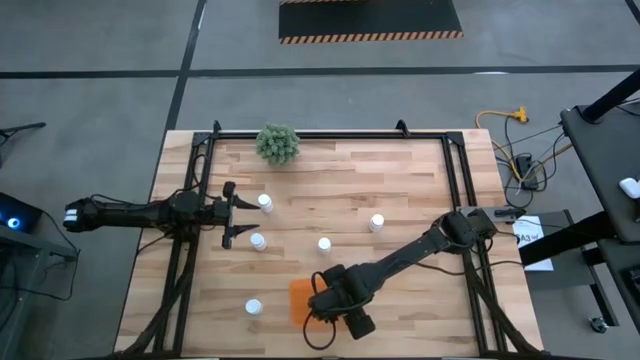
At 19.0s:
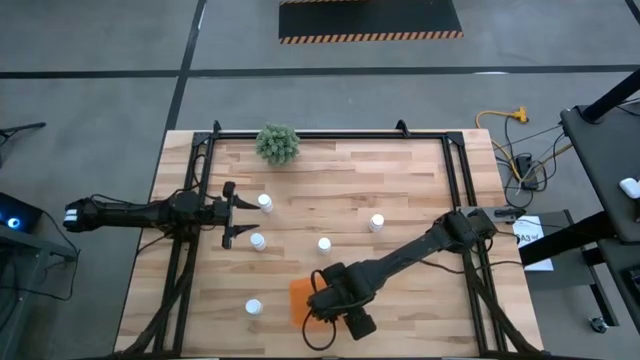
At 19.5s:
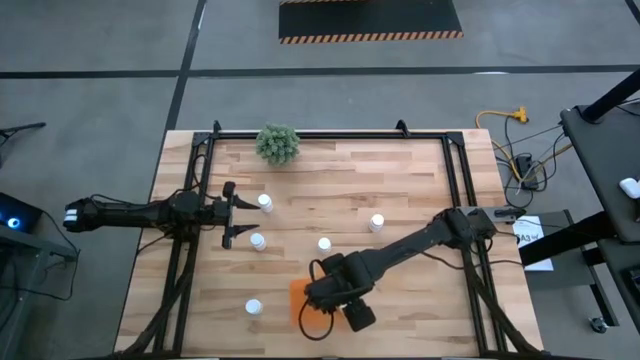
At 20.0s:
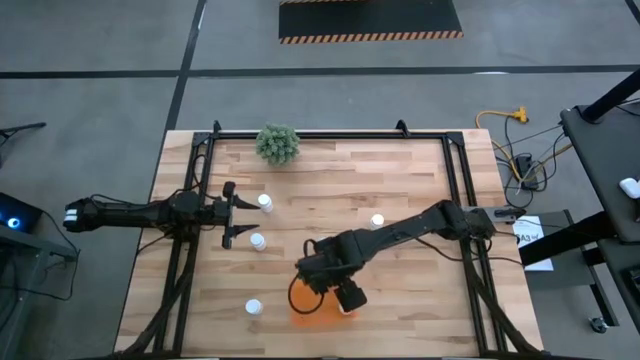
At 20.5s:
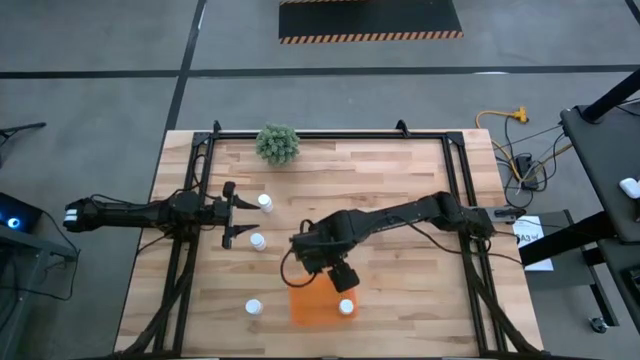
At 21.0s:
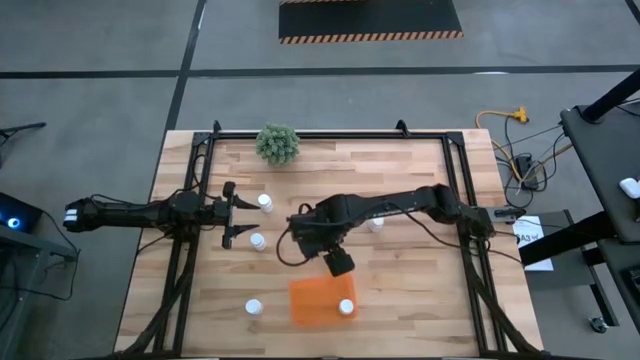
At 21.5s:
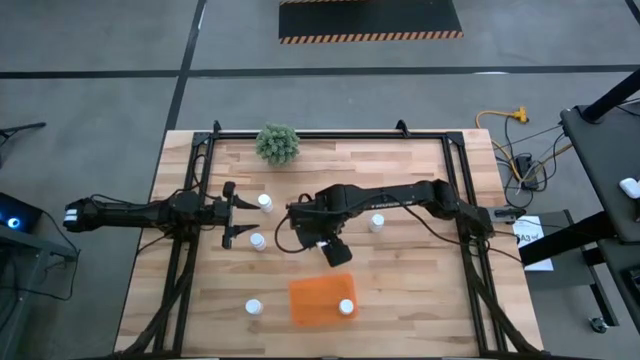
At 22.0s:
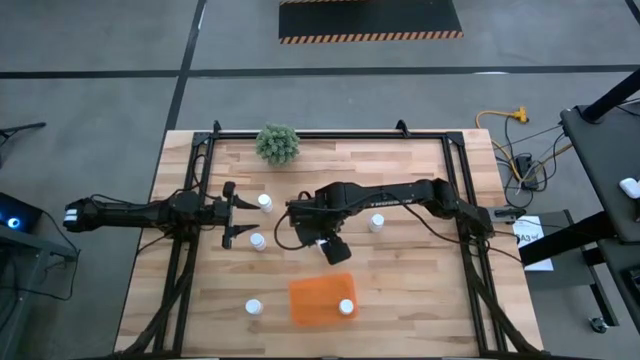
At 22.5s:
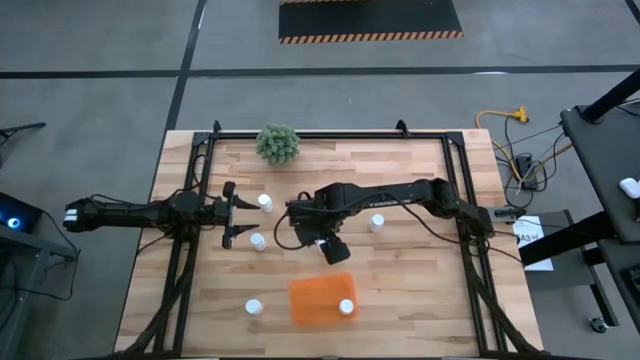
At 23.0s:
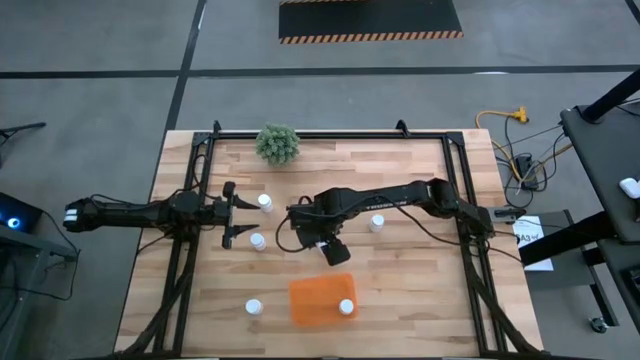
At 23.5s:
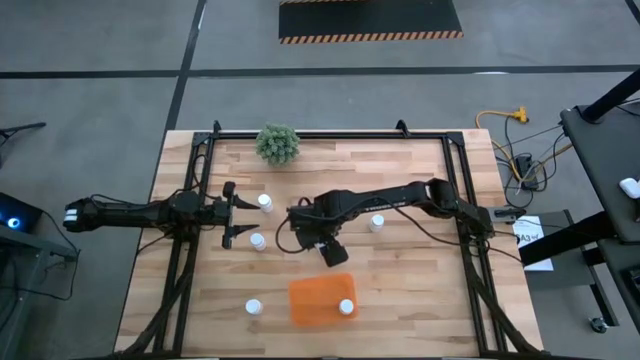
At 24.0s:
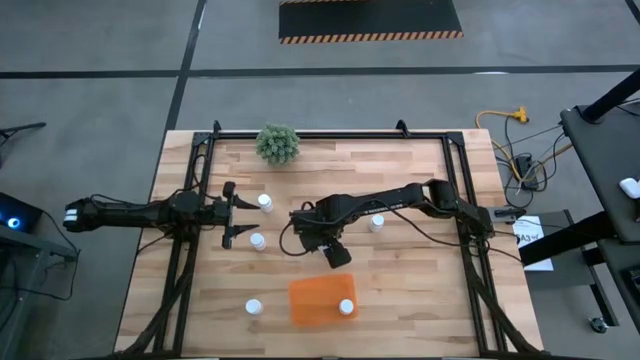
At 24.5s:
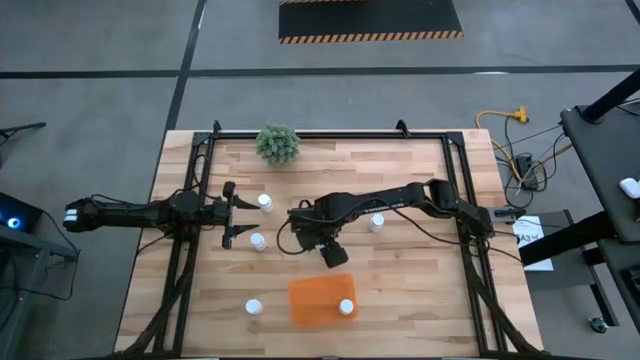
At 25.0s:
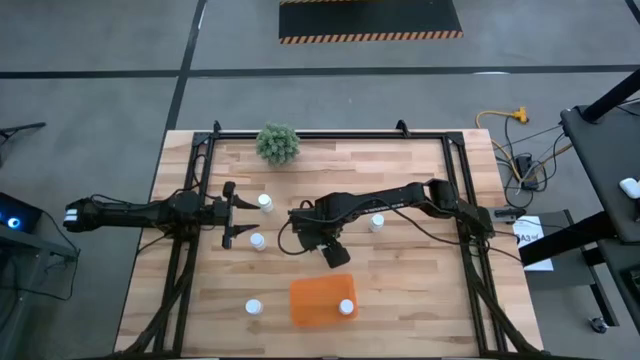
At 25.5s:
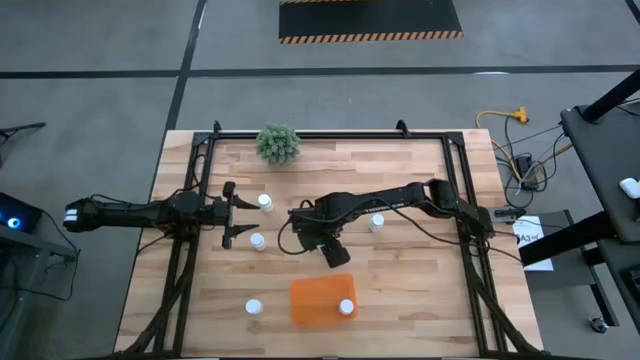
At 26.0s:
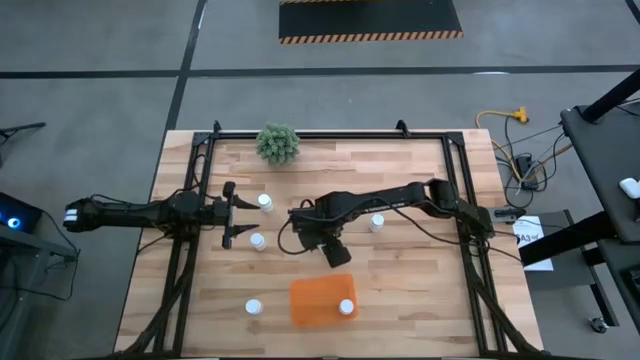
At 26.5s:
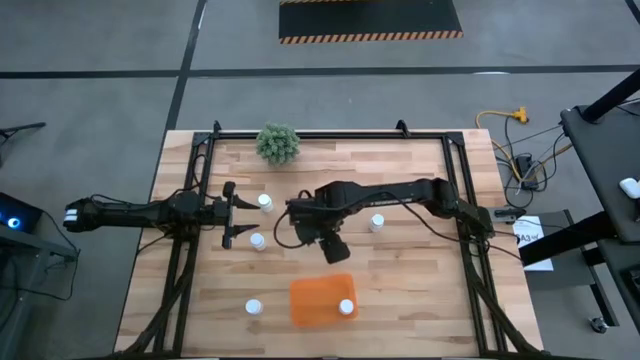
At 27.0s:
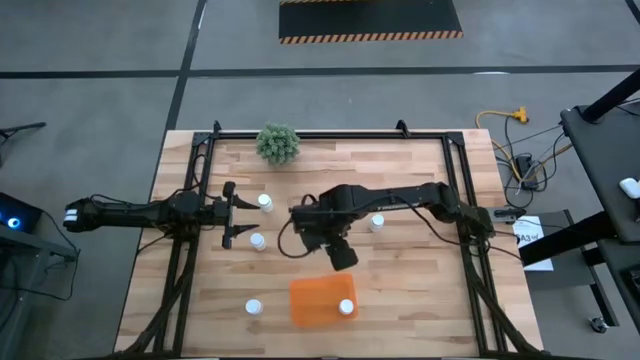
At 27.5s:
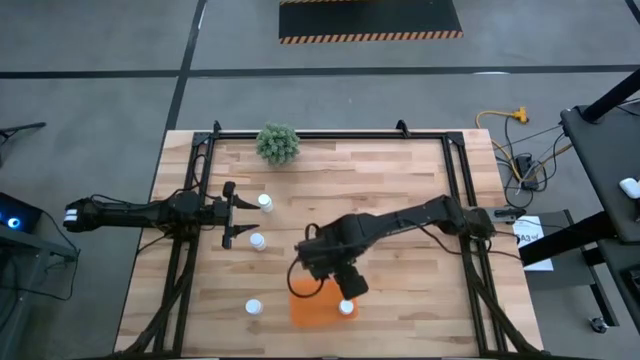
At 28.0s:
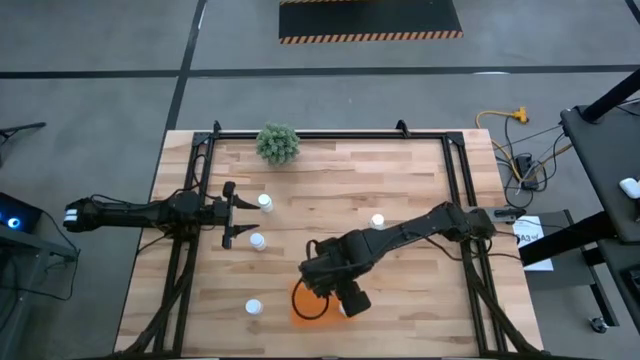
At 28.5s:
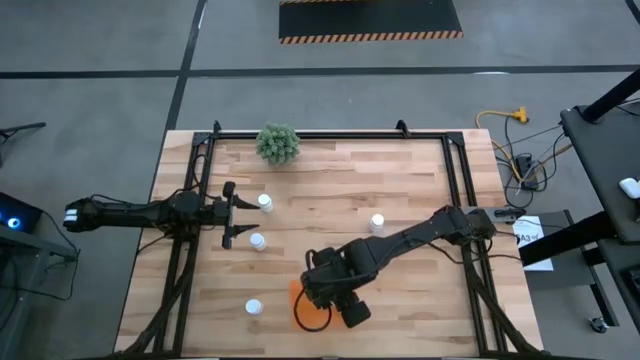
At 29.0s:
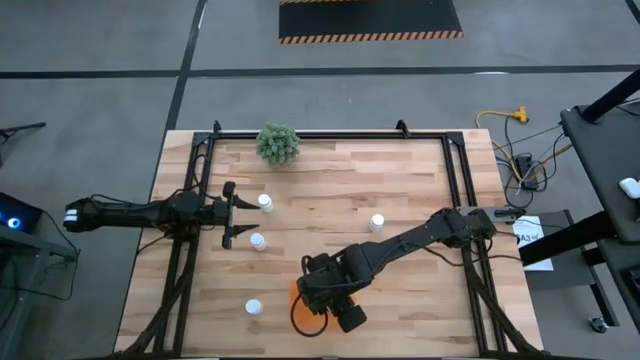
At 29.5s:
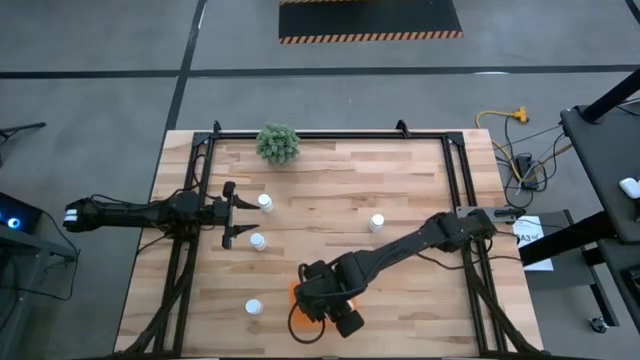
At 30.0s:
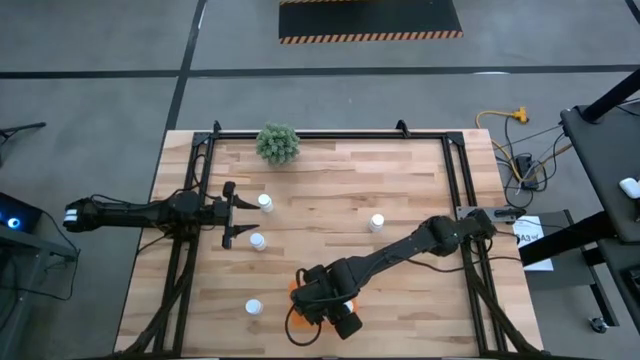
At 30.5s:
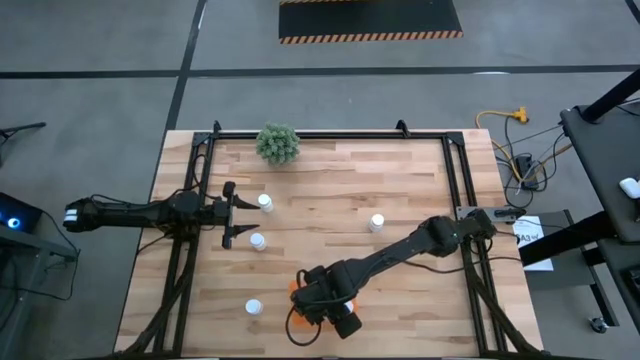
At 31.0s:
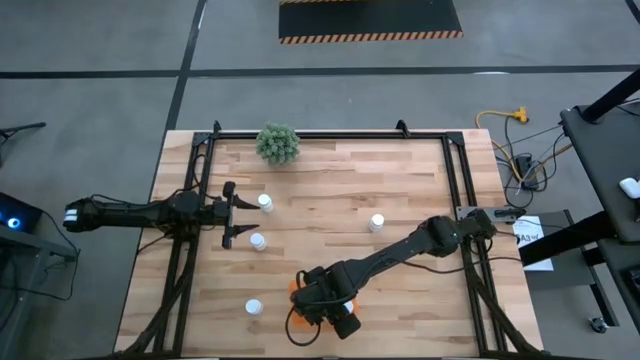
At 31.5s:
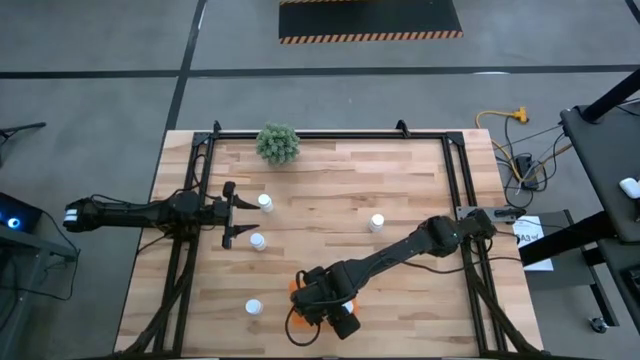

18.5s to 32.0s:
Task: Pick and place pill bottles into a basket
Put the pill bottle into the bin

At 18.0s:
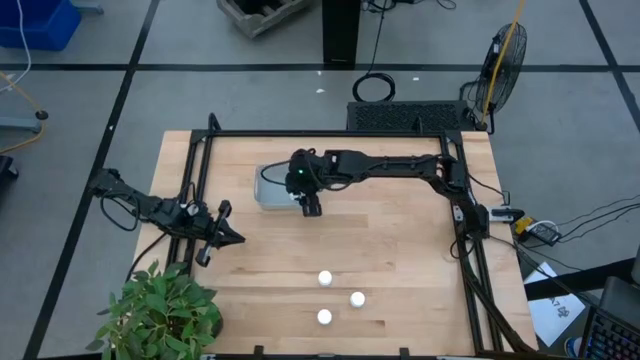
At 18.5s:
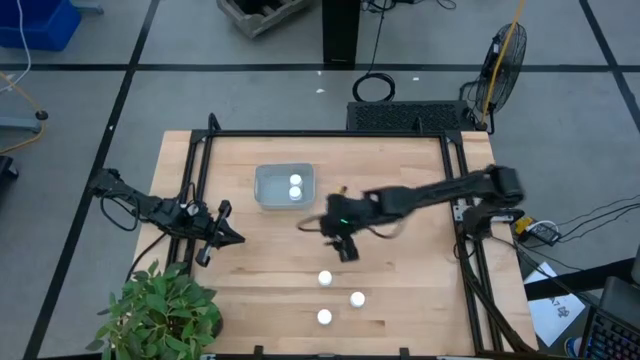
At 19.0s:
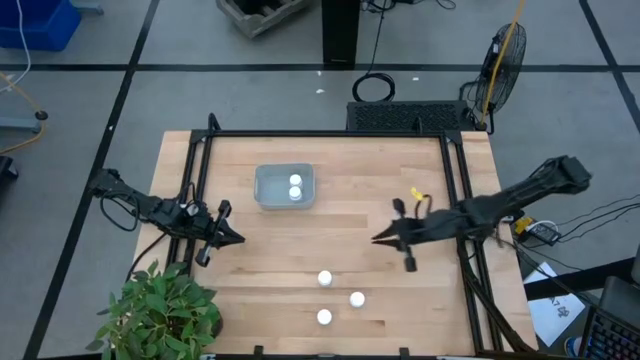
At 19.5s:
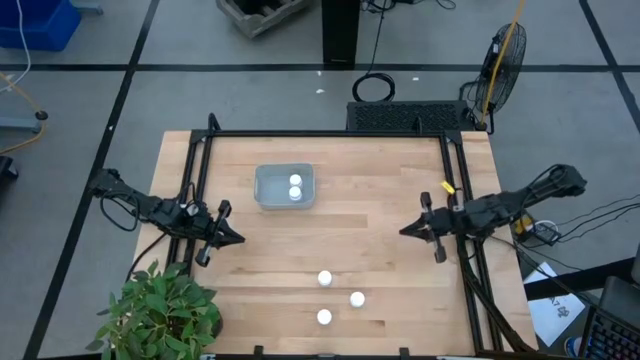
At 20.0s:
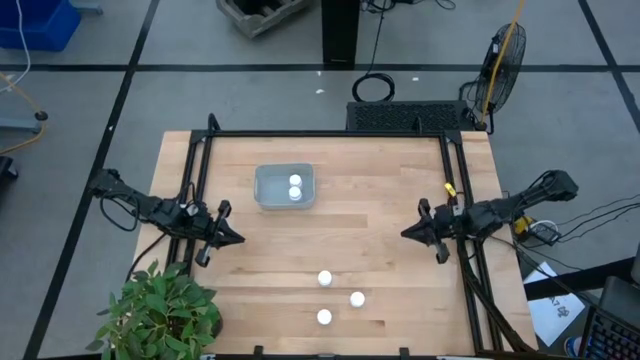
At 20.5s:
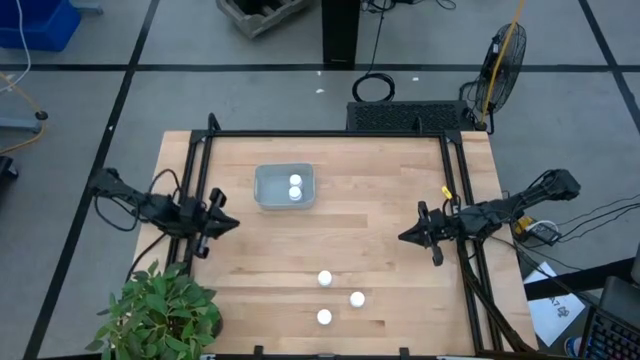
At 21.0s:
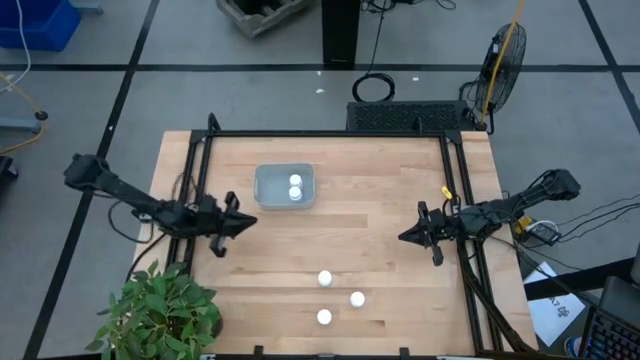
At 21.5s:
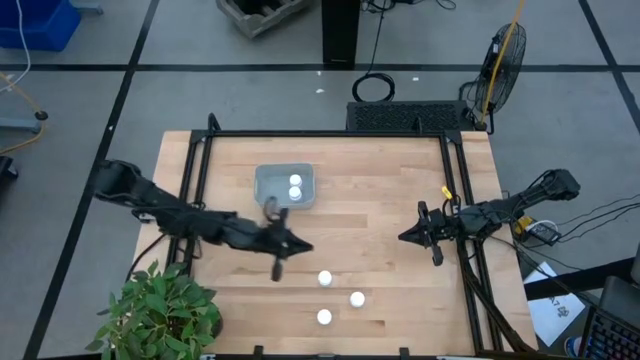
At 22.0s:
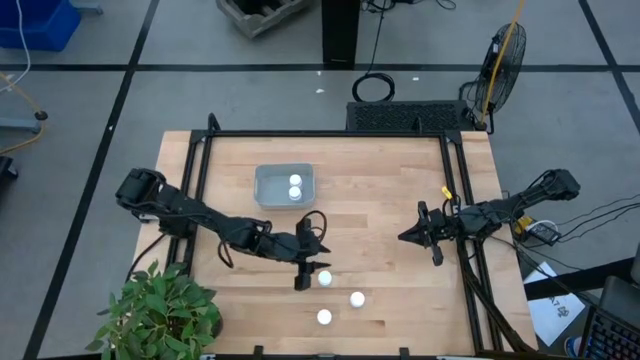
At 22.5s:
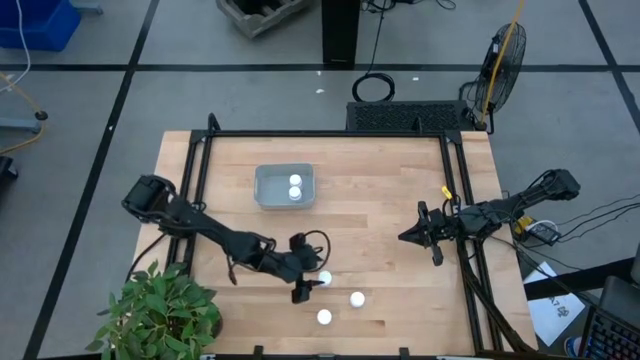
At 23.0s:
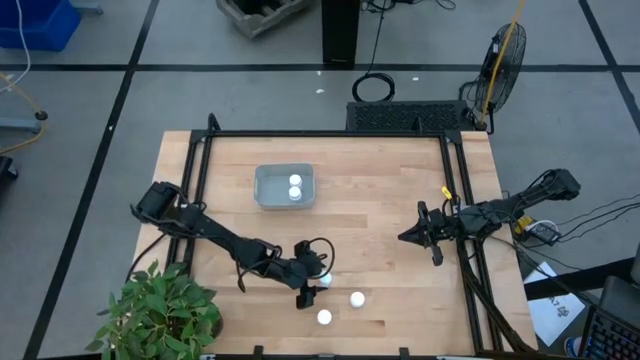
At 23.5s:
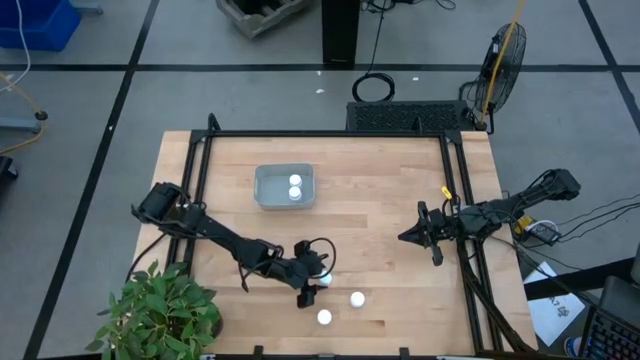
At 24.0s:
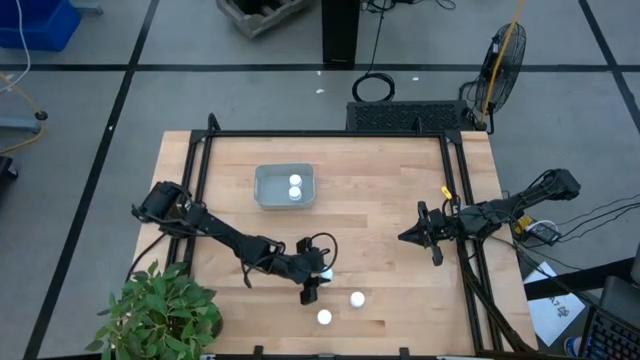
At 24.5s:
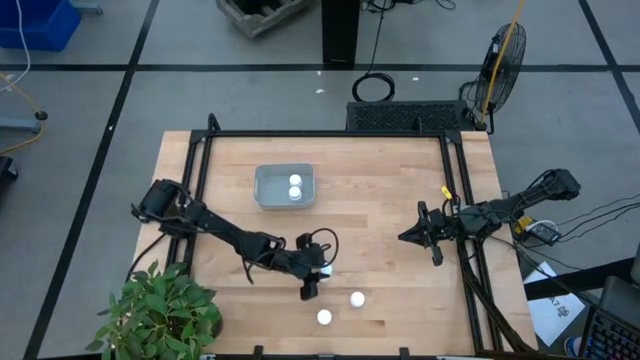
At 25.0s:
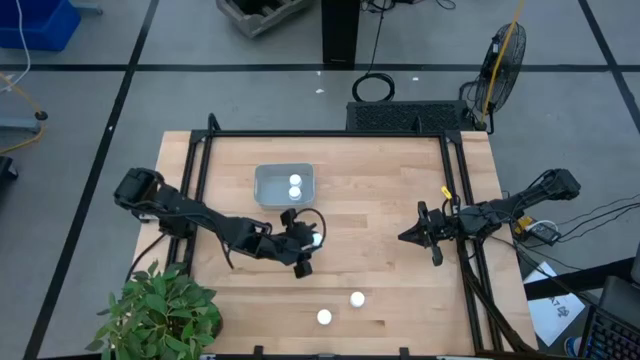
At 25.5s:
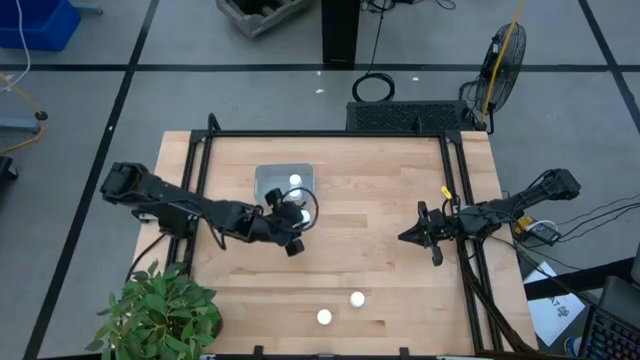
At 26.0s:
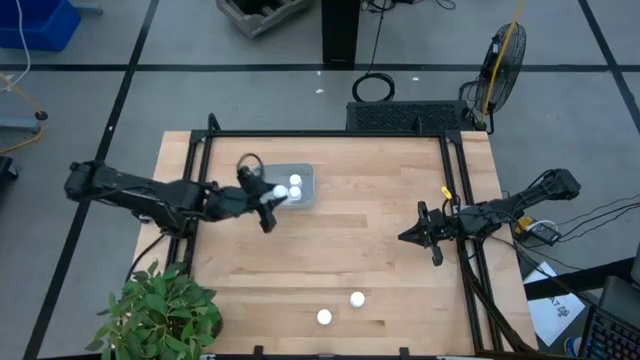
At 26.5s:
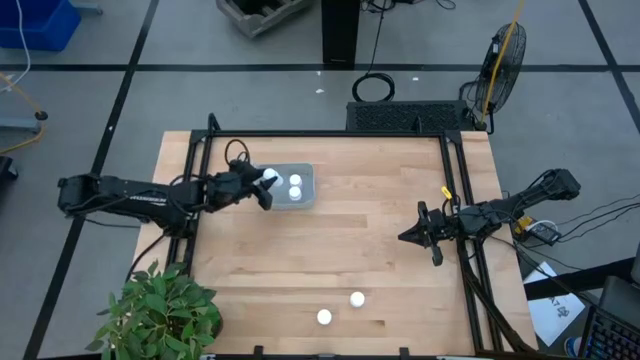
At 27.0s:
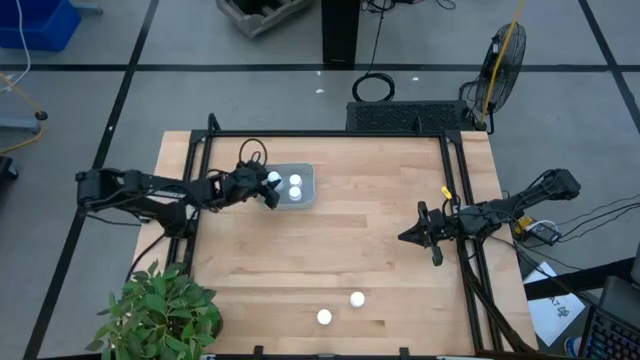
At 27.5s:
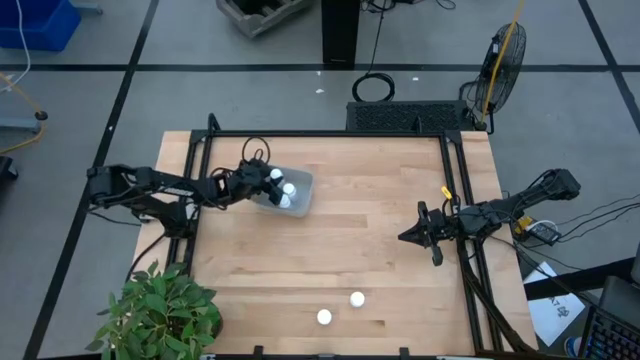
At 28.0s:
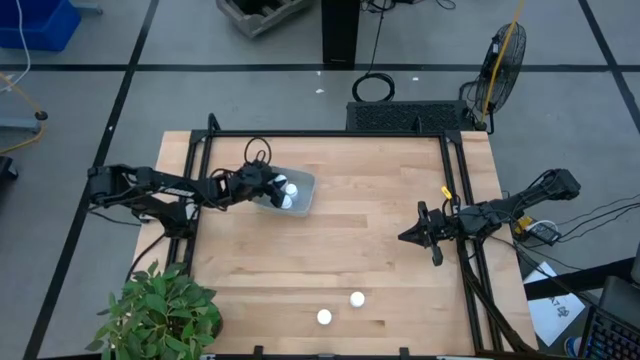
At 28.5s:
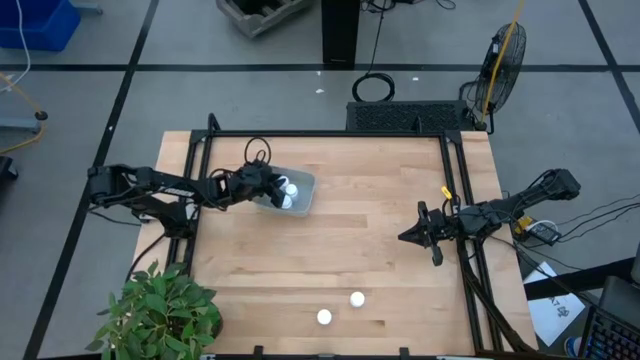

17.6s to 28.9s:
Task: Pick and place pill bottles into a basket
Put the white medicine bottle into the gray basket
